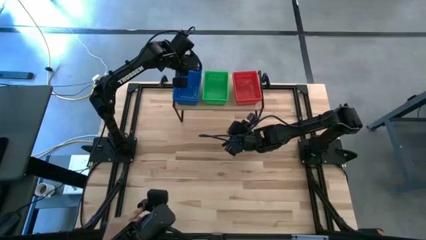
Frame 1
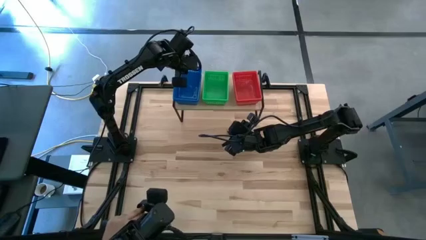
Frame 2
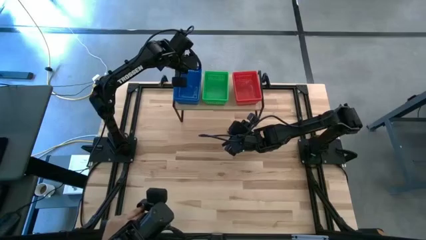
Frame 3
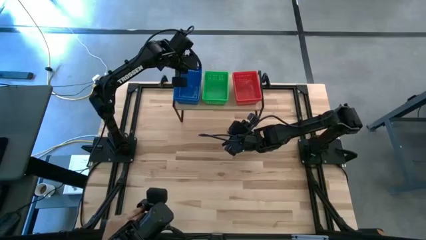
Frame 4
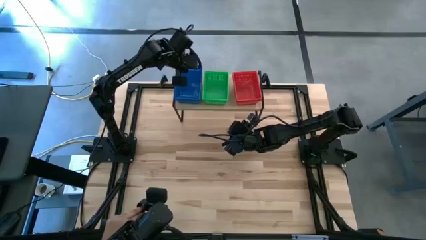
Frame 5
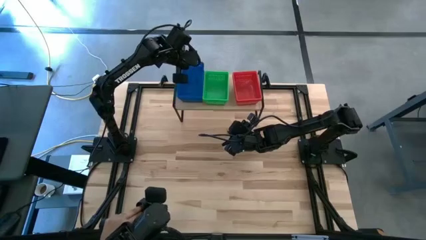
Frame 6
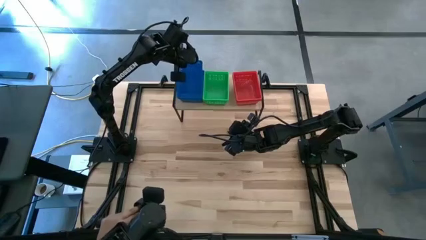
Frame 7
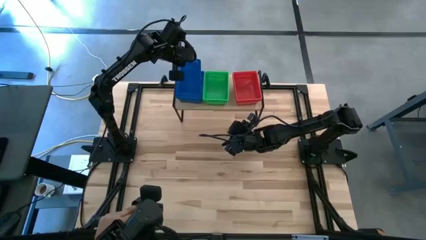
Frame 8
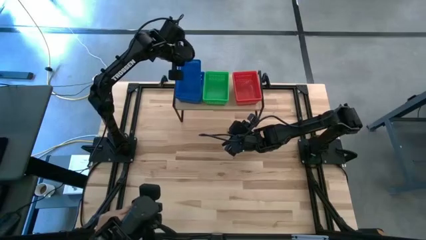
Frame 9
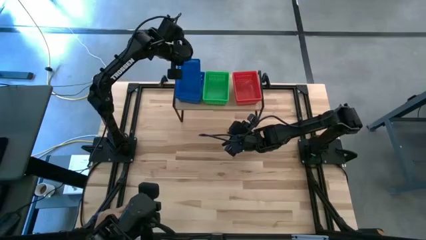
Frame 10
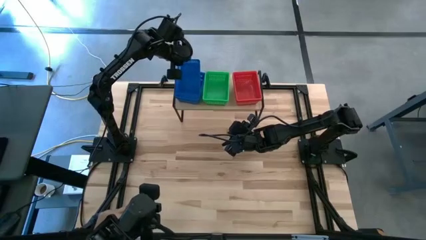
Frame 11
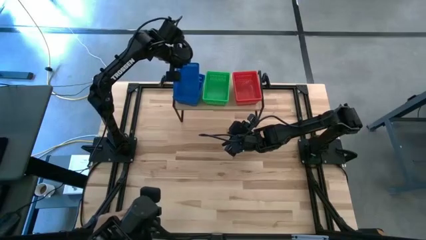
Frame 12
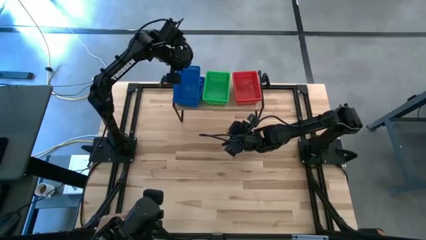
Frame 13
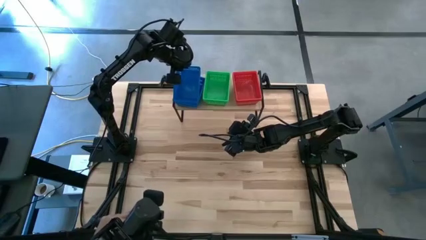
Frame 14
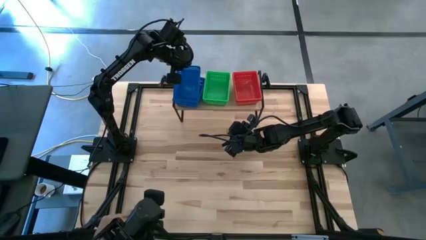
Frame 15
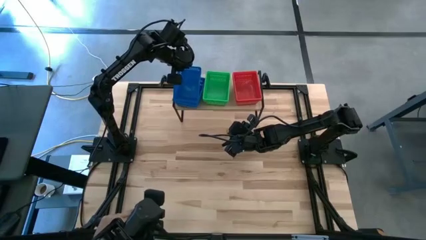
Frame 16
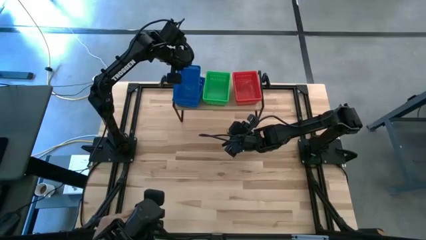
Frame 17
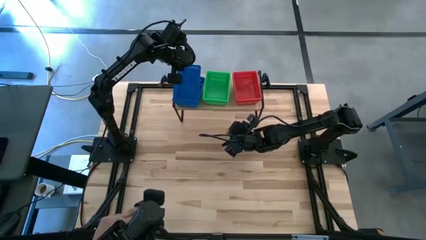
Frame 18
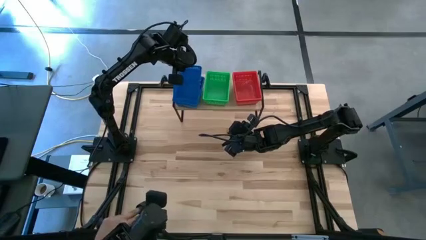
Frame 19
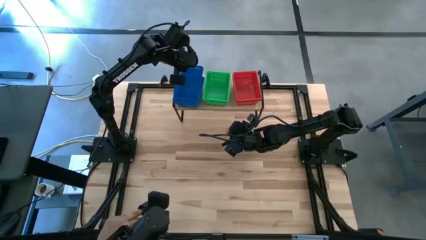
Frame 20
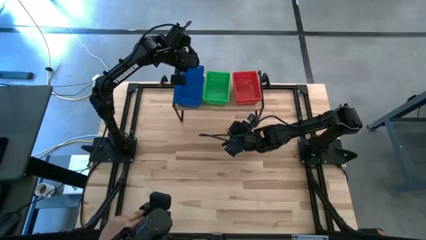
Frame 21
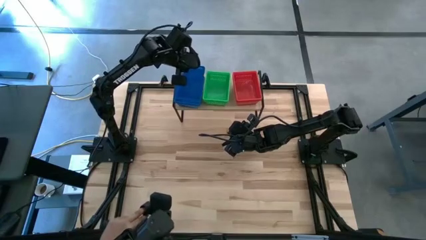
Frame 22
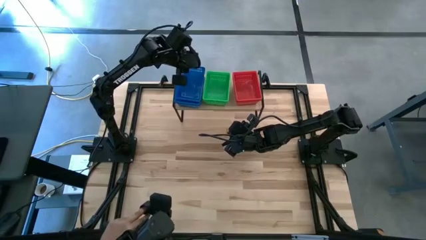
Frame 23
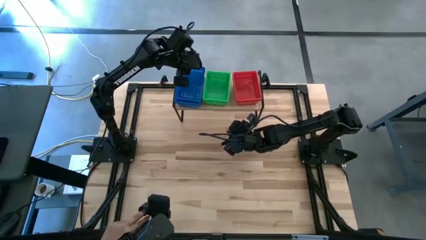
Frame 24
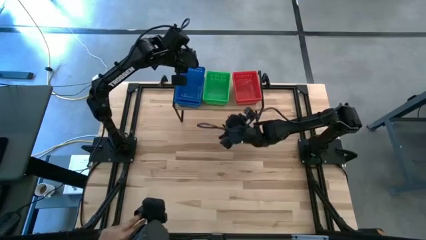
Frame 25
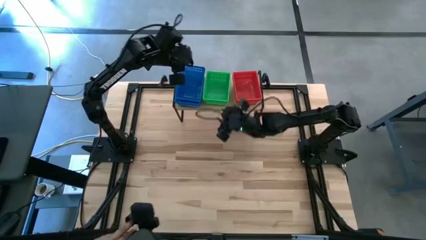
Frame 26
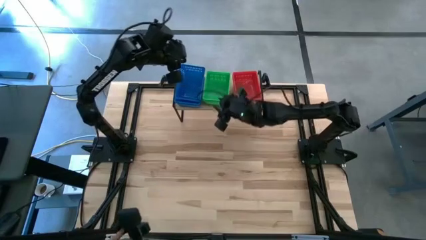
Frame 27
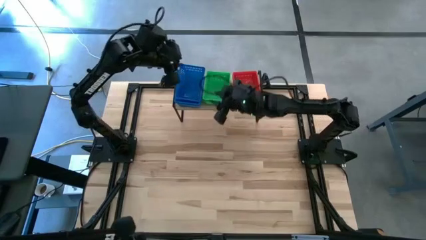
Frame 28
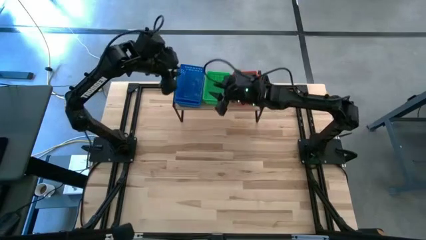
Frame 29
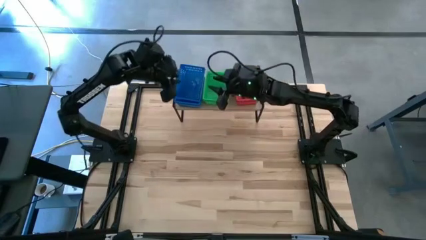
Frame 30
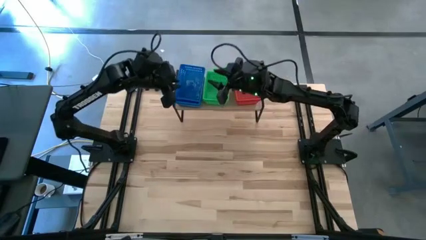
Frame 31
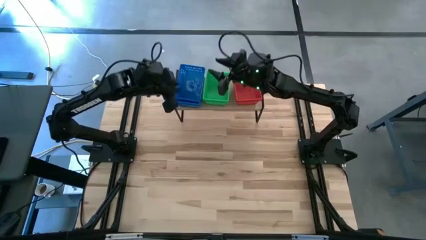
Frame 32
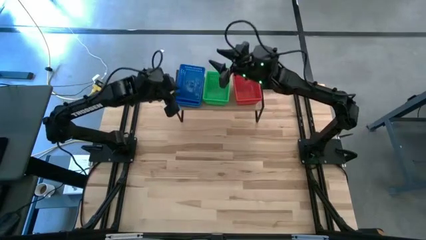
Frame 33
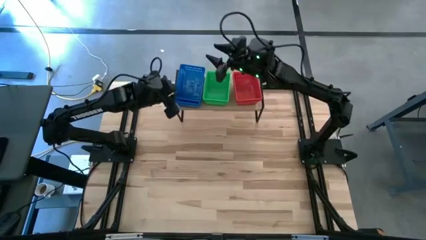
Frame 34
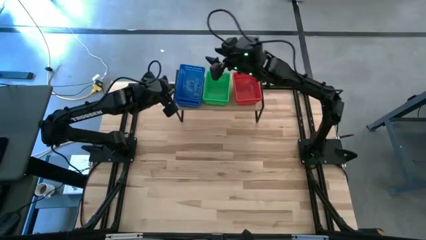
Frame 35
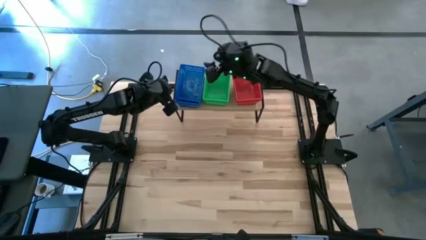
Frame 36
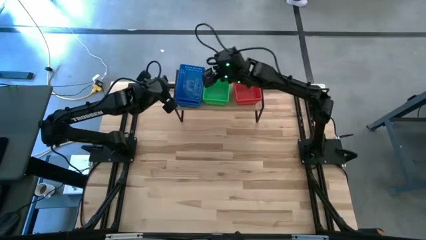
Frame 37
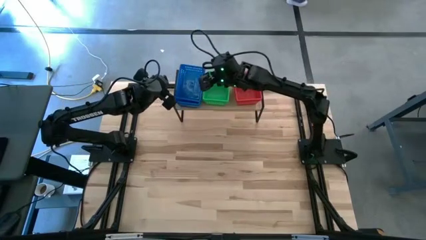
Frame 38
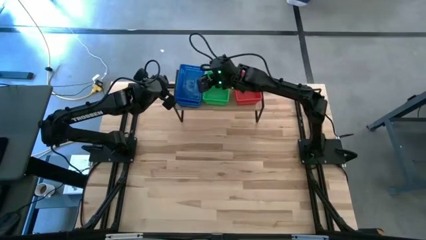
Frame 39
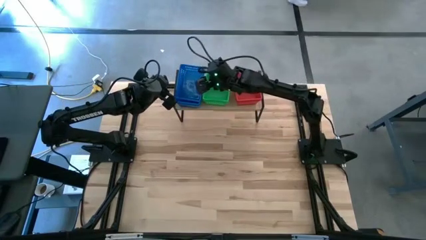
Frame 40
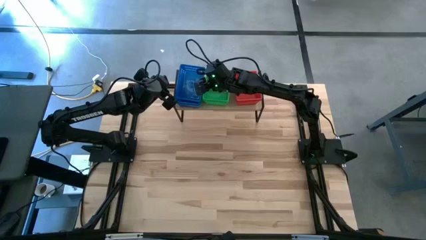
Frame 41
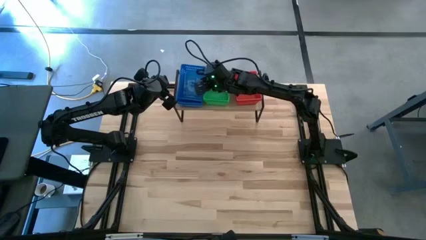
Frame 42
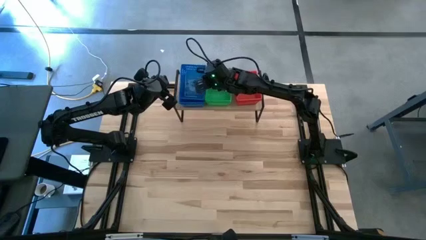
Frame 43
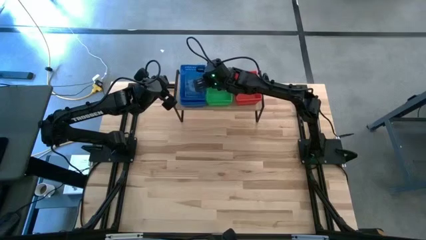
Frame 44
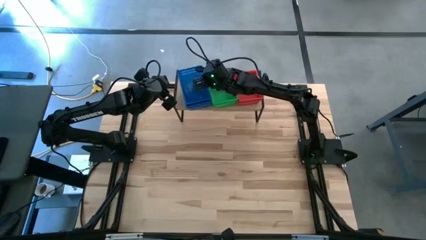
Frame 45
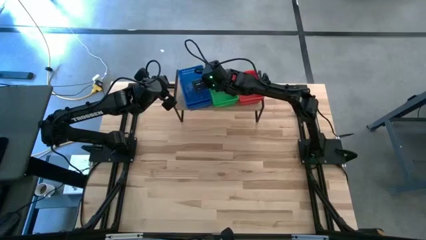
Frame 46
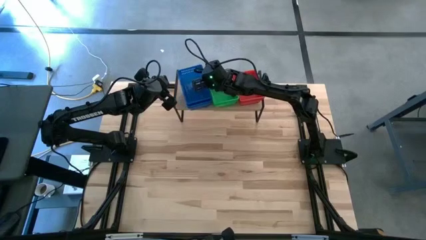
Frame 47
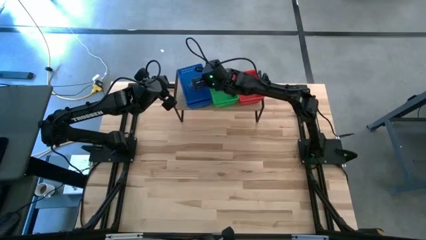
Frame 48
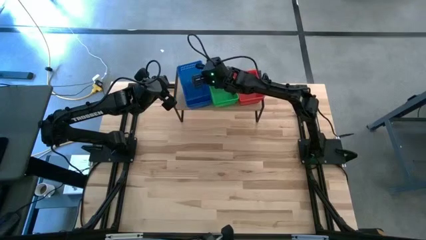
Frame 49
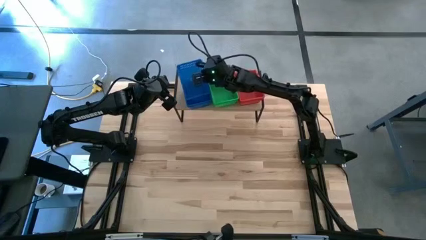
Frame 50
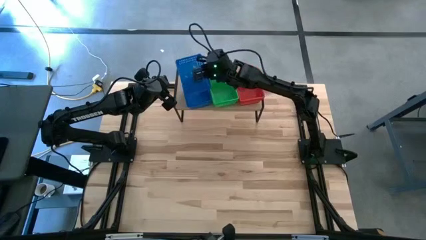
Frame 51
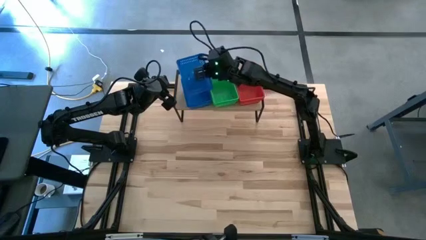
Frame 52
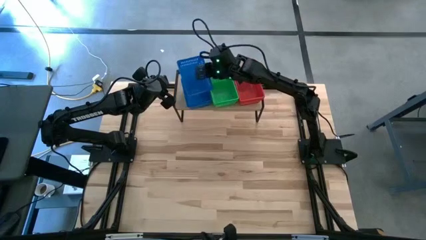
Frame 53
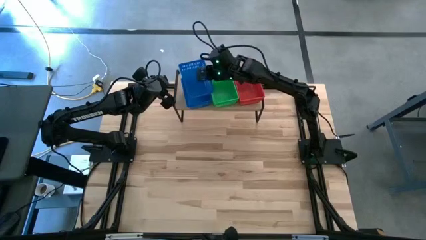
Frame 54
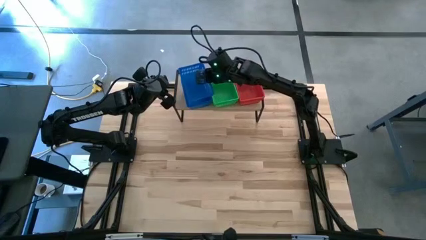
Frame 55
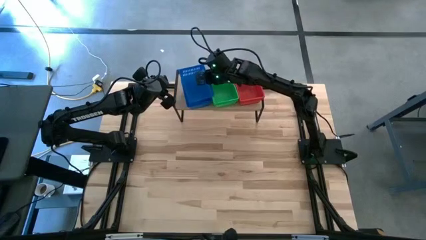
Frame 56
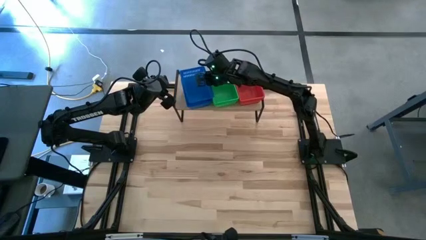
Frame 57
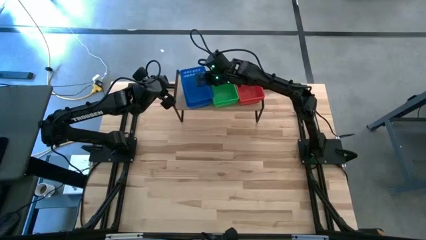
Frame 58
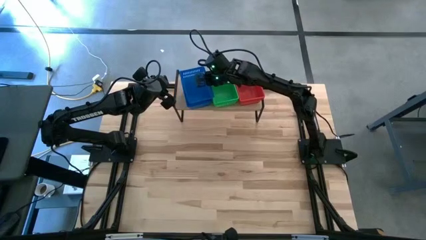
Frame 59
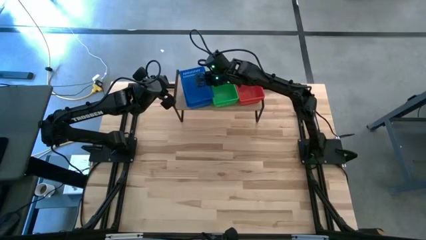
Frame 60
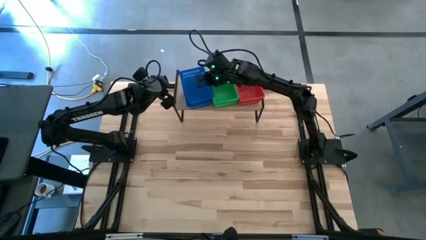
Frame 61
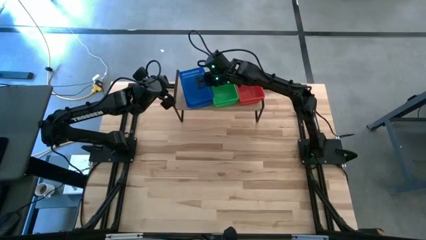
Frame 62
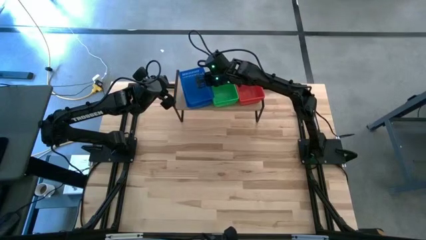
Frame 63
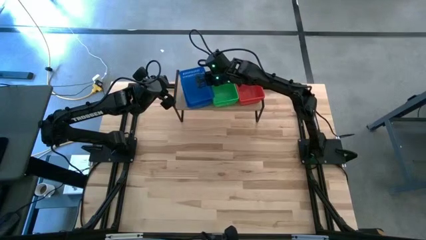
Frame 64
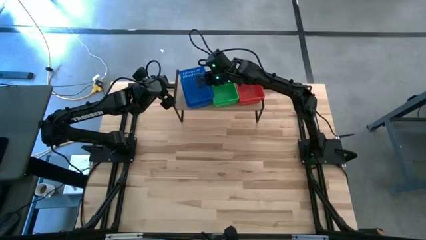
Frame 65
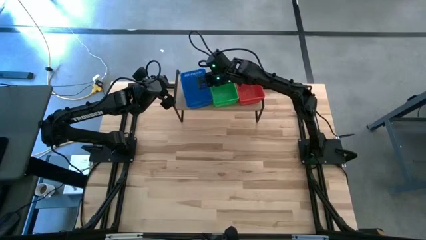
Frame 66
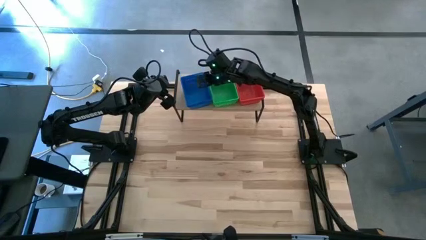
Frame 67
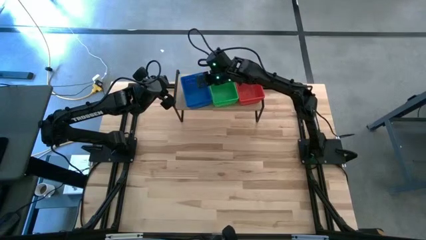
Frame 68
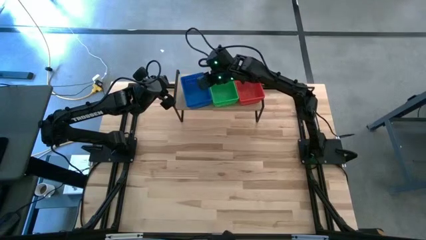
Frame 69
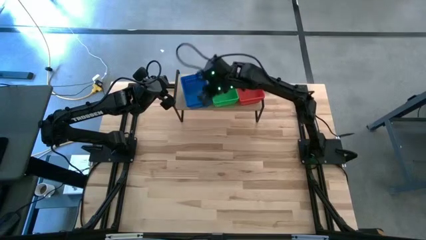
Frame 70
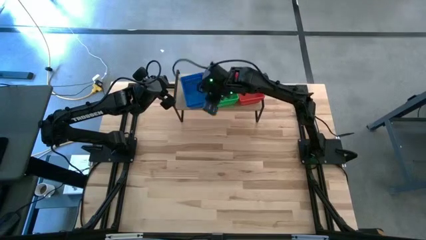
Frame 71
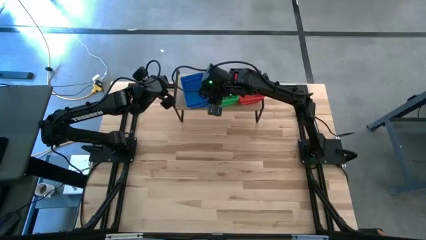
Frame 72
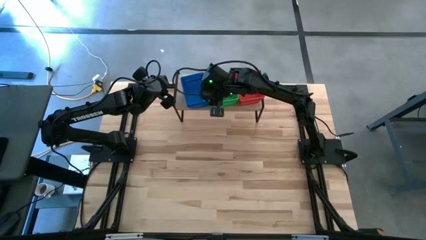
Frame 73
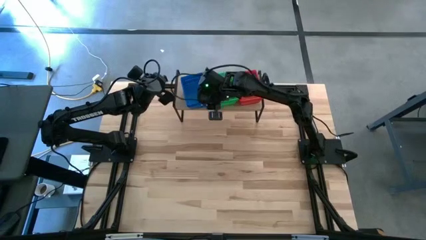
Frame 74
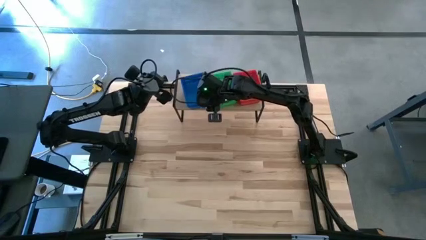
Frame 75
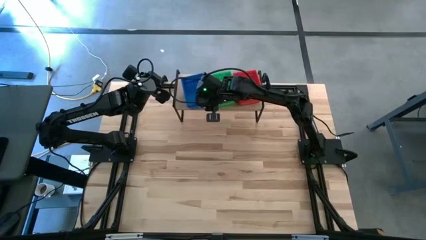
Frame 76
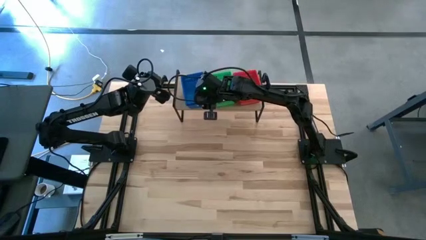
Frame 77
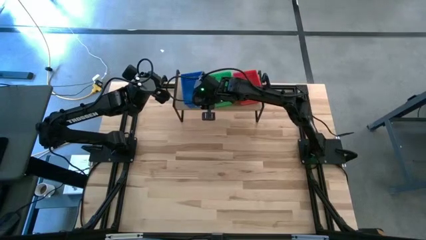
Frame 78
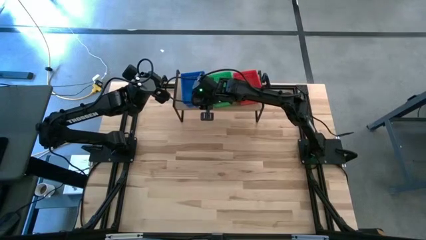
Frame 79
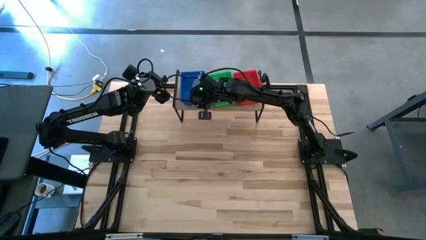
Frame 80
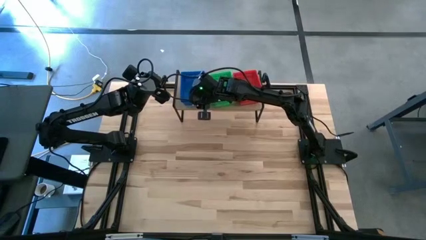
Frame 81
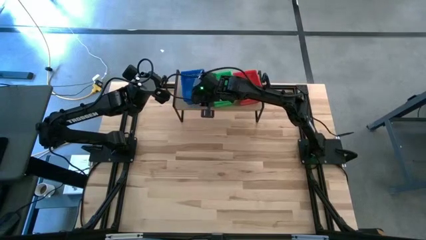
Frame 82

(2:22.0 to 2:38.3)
Task: Stack baskets on shelf by color
Stack the blue bin on top of the blue bin on the shelf
